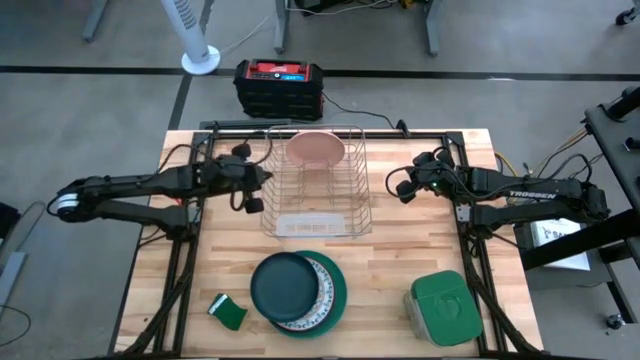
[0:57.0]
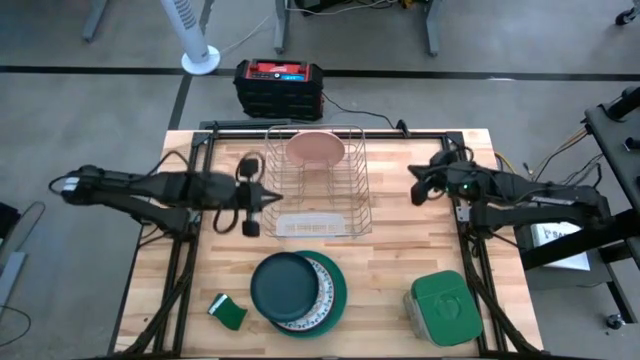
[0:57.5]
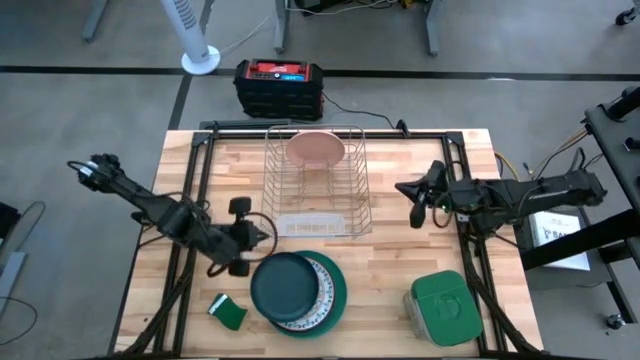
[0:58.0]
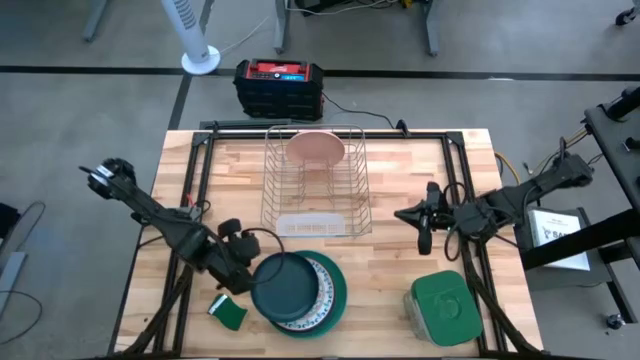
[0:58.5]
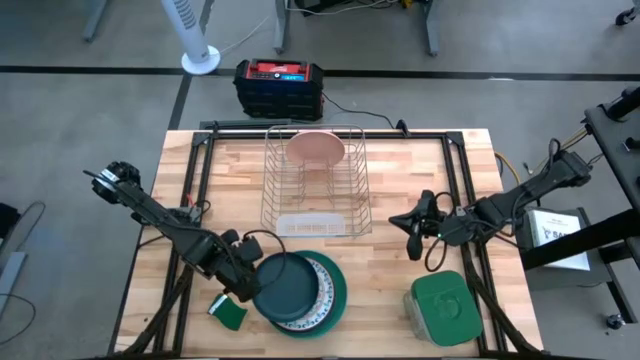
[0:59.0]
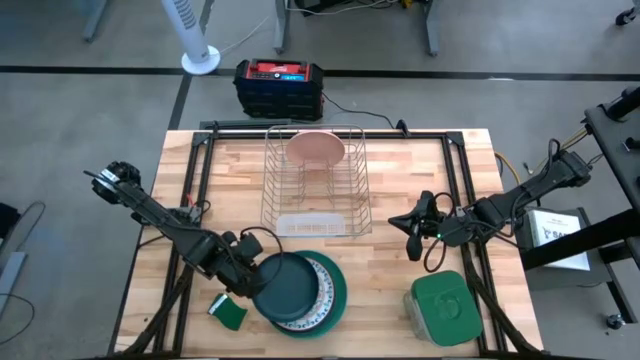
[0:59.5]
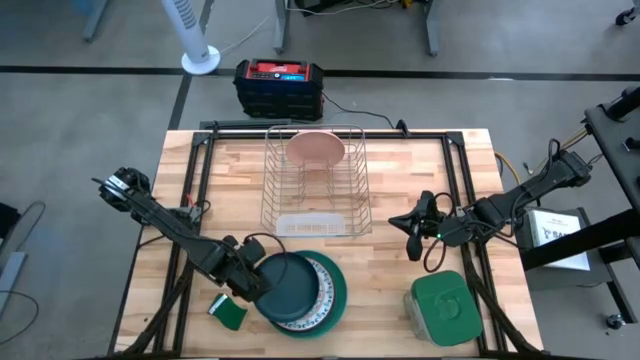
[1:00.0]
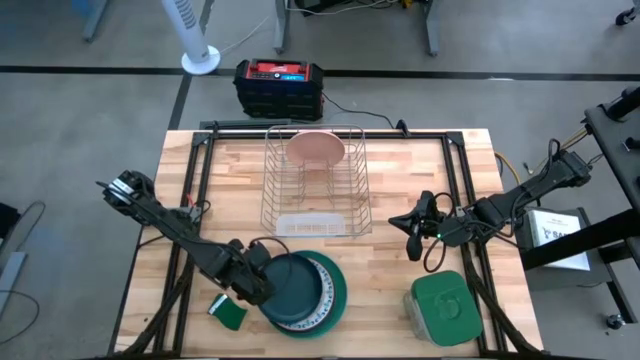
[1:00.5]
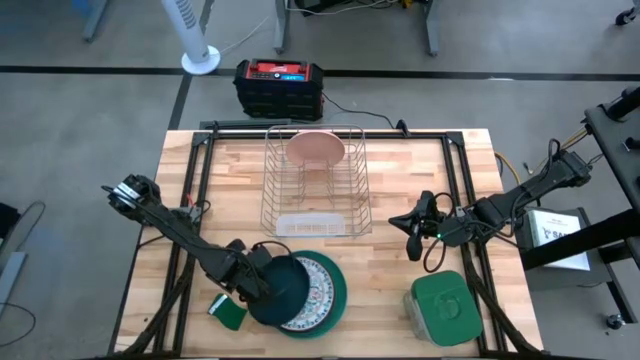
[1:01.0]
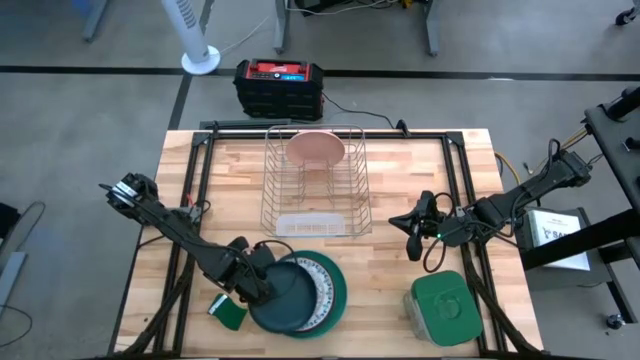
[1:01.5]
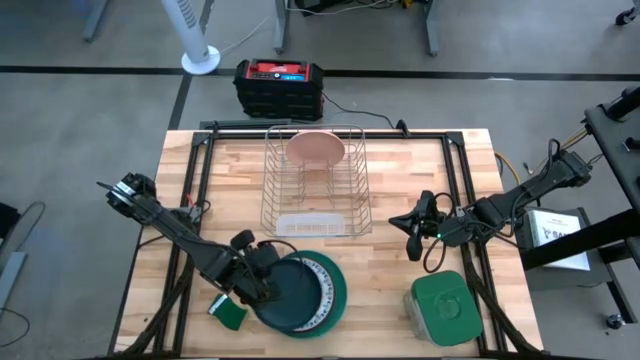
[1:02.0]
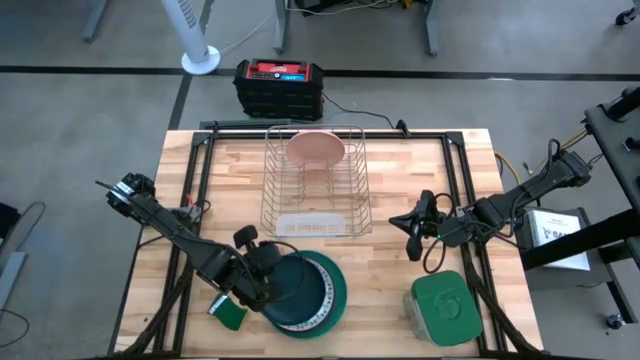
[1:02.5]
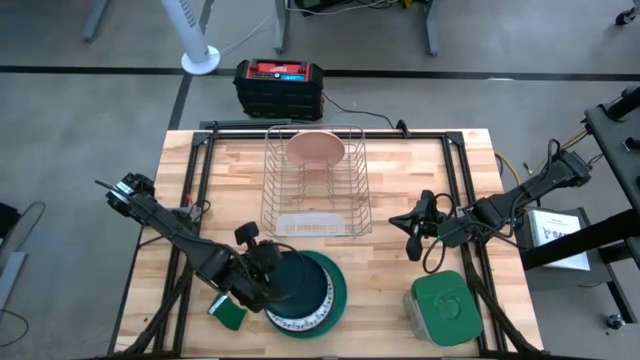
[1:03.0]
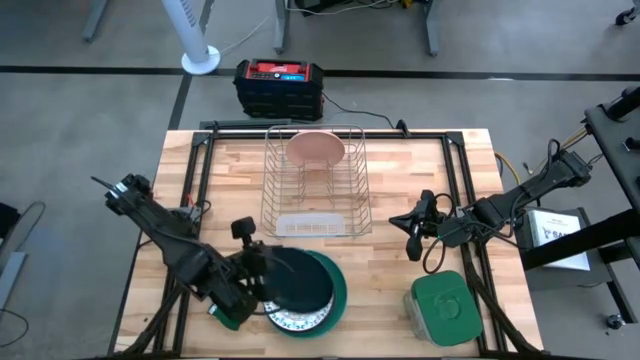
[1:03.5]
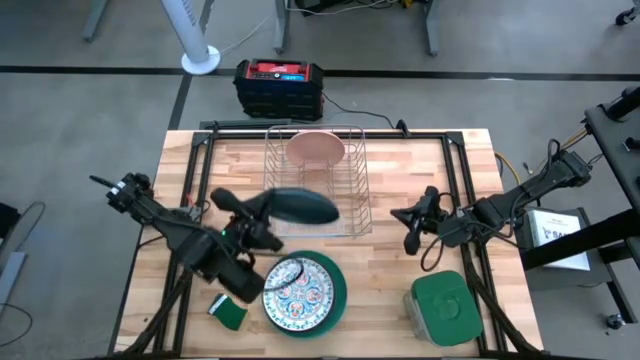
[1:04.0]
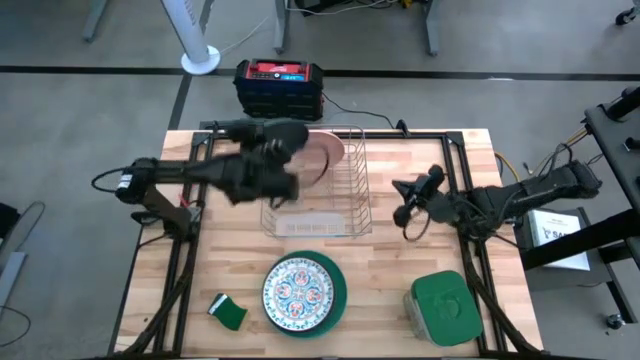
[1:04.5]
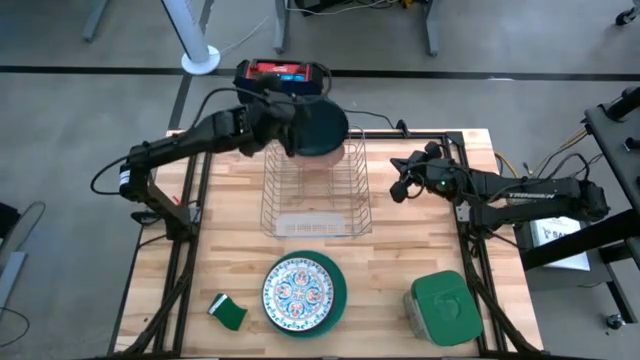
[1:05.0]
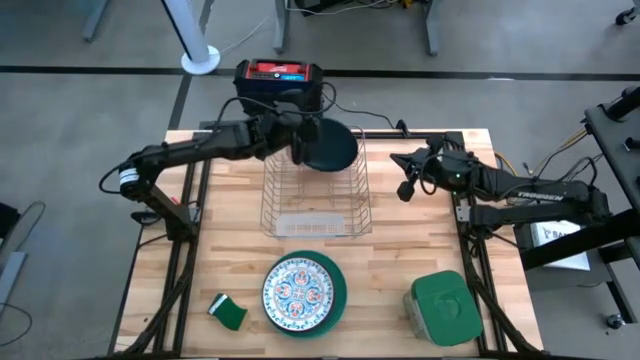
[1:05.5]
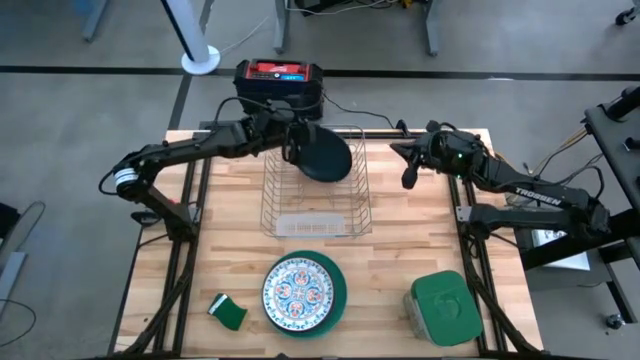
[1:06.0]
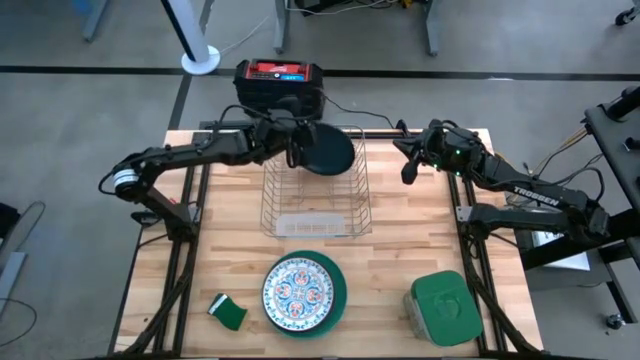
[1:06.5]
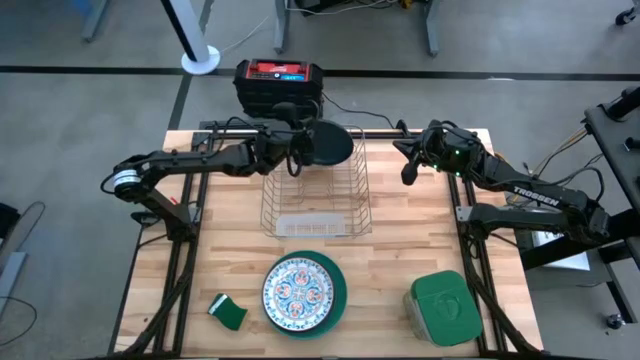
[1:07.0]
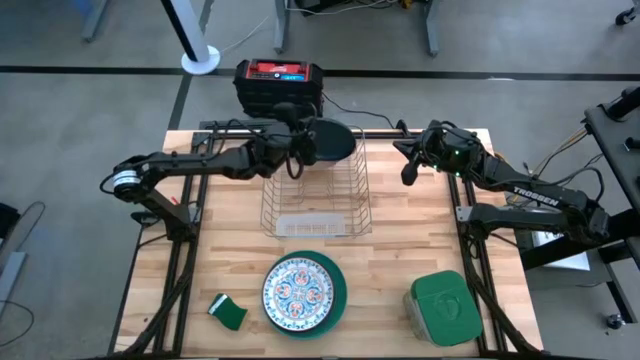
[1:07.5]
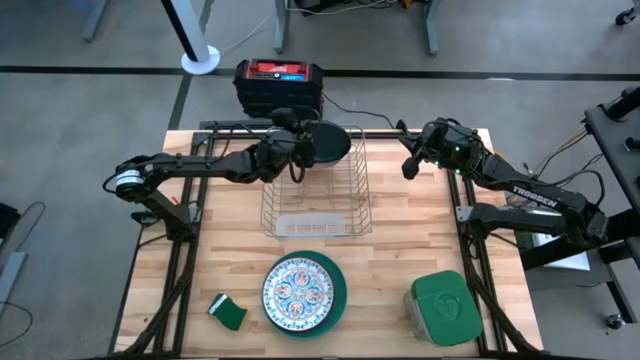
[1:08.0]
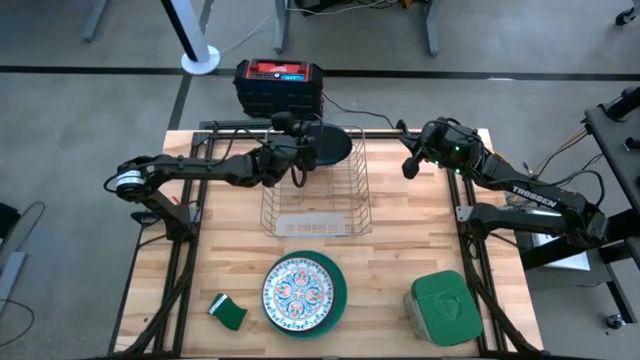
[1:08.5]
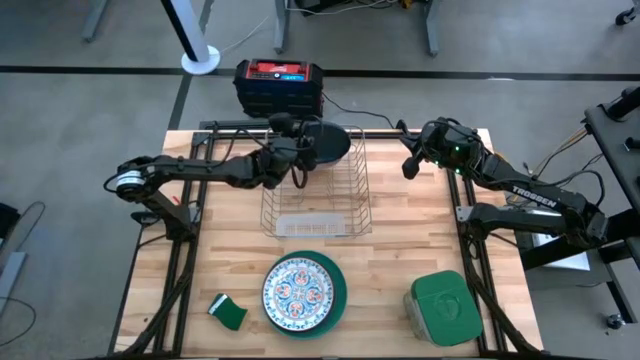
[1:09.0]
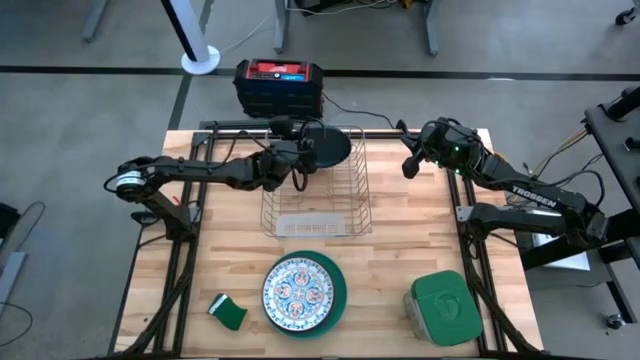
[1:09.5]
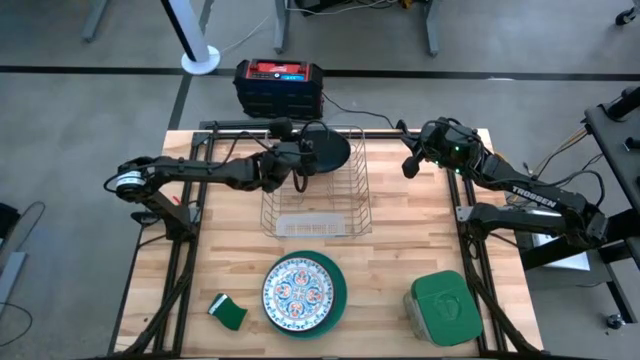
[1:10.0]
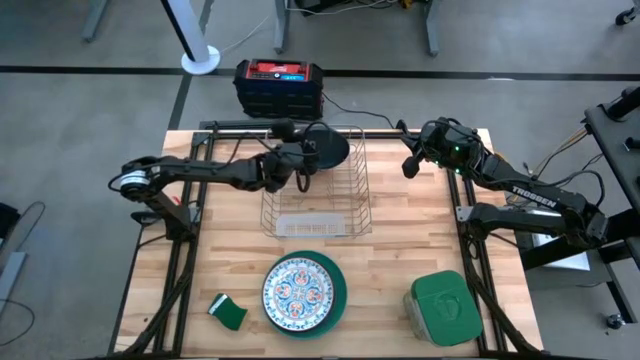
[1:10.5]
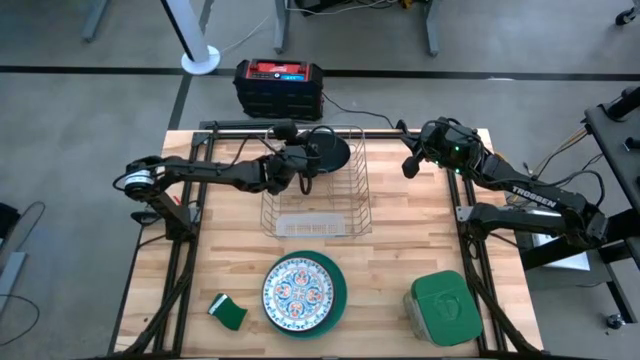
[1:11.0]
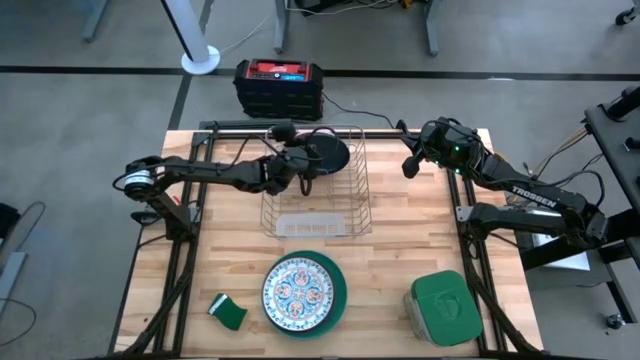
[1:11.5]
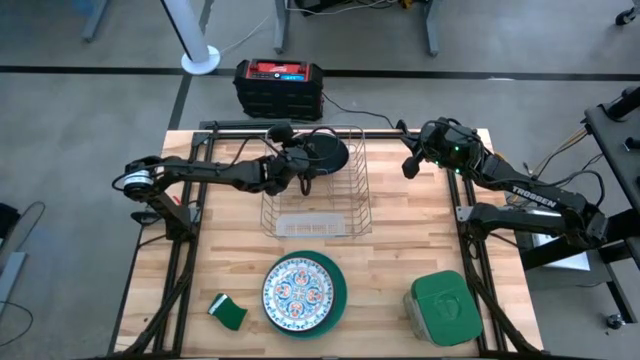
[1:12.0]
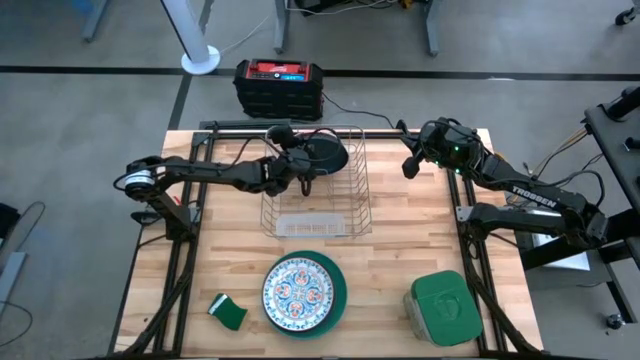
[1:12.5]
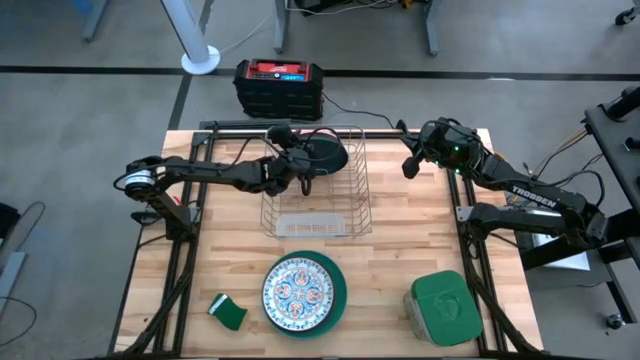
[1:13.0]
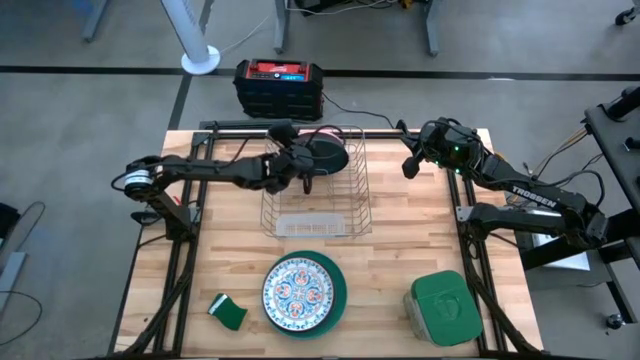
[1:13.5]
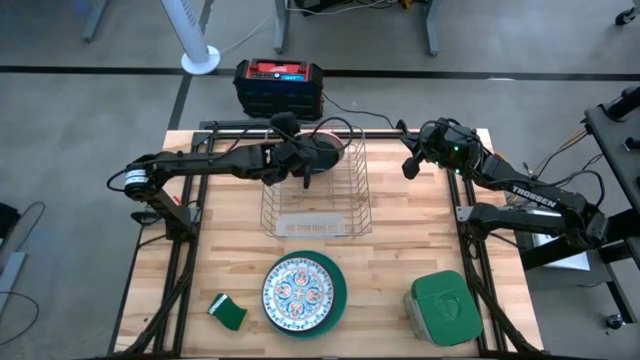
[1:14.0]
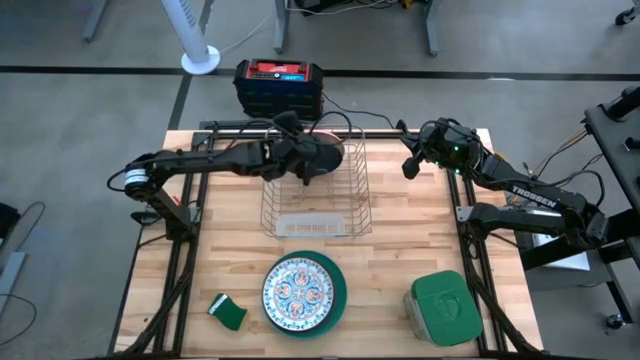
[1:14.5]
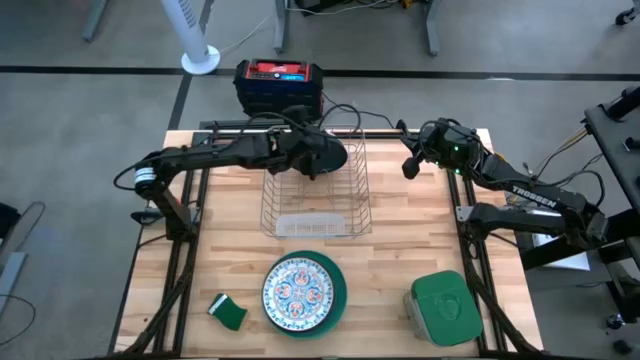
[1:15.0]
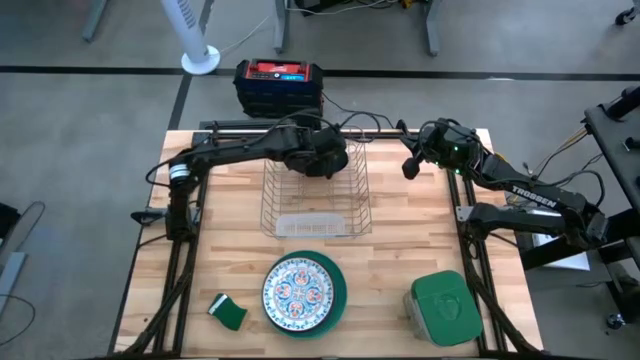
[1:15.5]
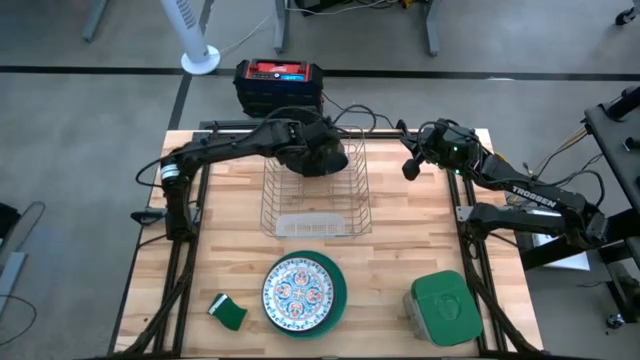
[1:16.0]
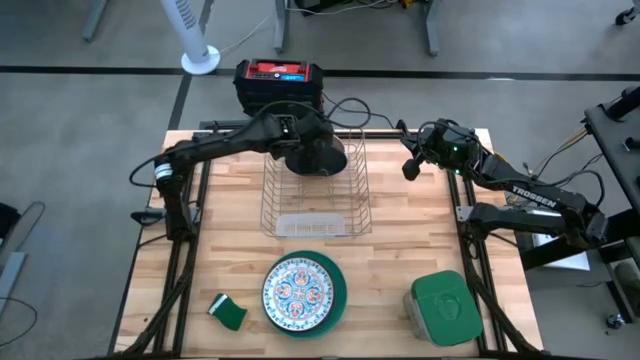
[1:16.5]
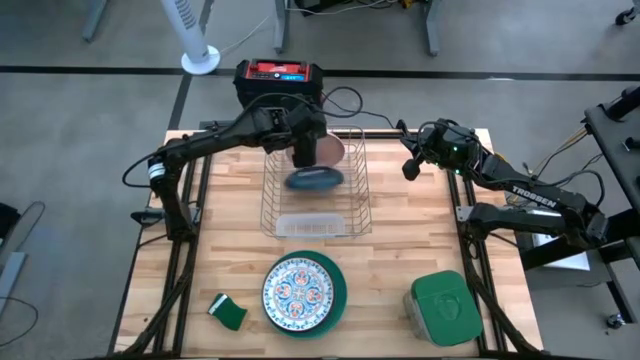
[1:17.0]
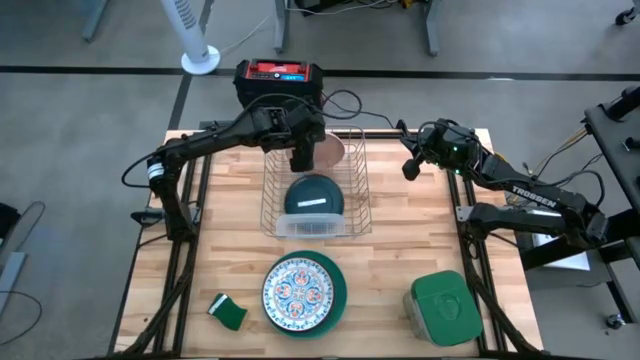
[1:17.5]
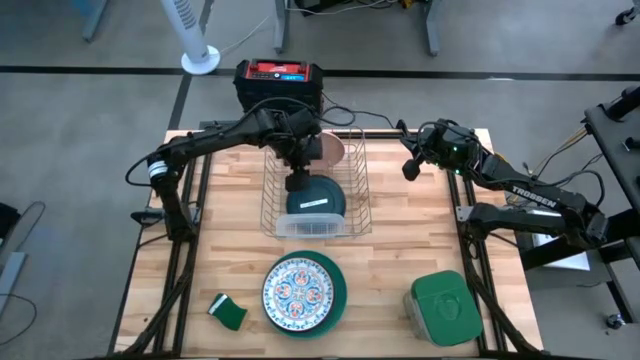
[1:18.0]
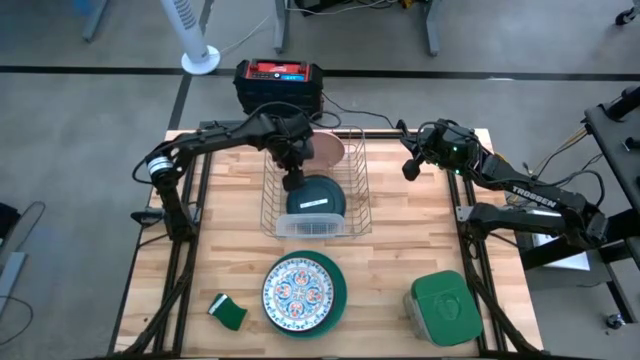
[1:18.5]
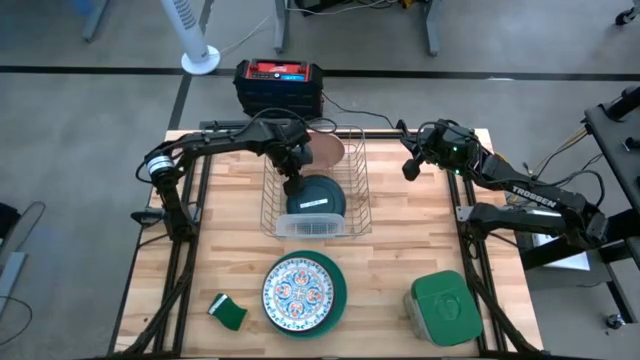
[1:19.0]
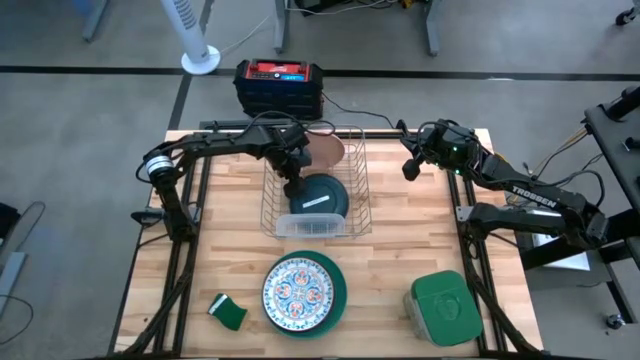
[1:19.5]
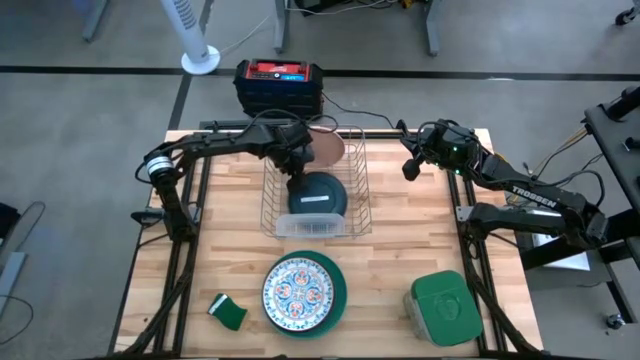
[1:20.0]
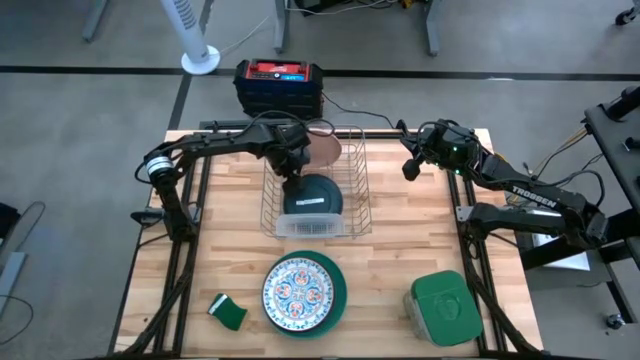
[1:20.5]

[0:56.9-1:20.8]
Task: Sort dishes
Put the dark green plate in the dishwasher rack
